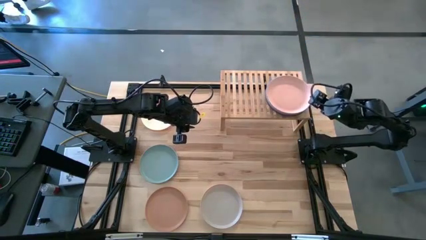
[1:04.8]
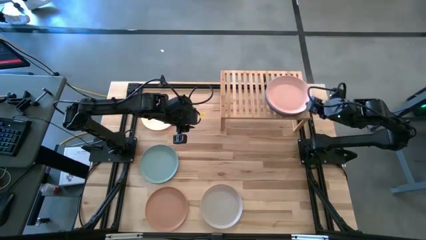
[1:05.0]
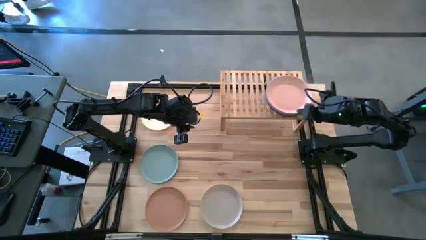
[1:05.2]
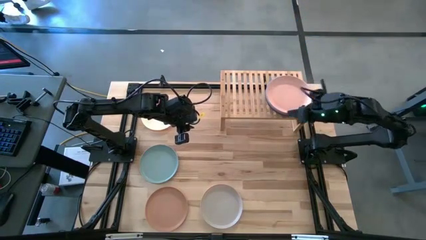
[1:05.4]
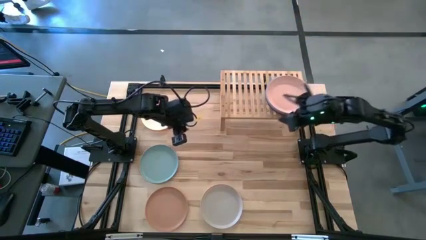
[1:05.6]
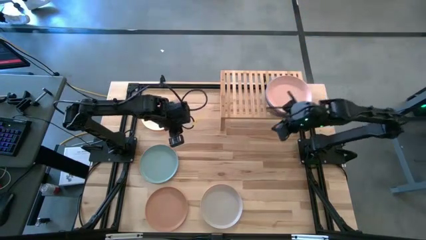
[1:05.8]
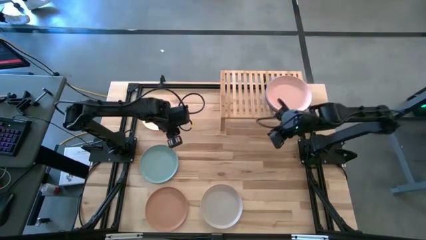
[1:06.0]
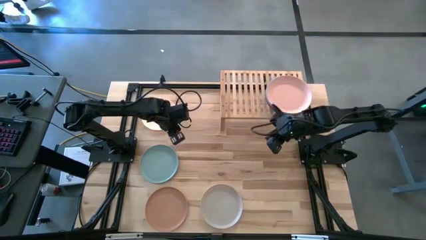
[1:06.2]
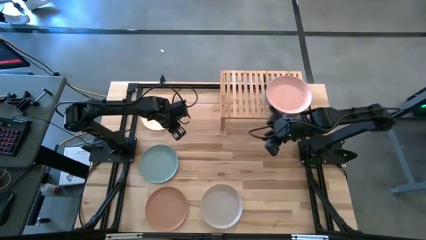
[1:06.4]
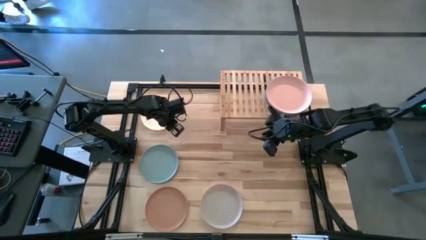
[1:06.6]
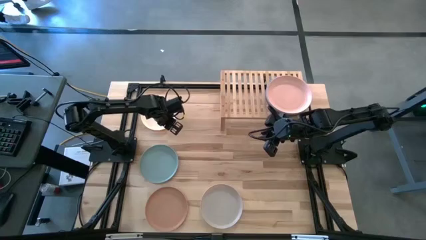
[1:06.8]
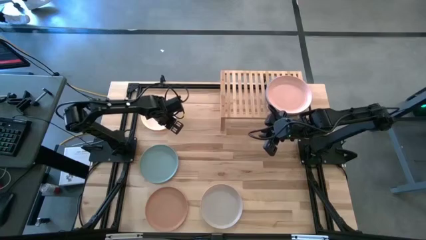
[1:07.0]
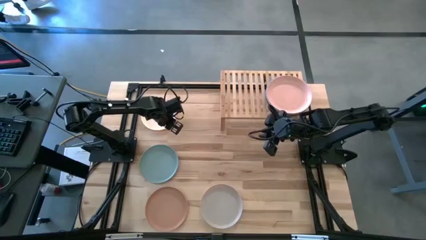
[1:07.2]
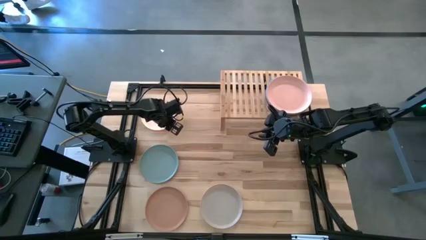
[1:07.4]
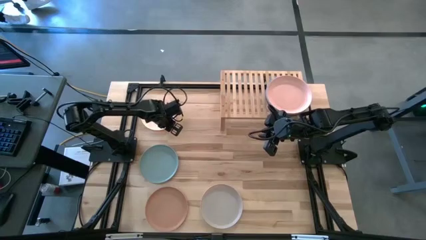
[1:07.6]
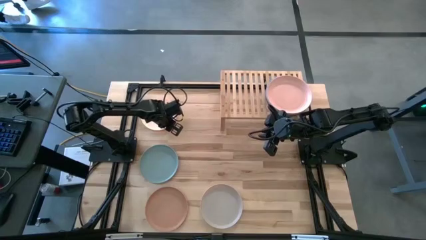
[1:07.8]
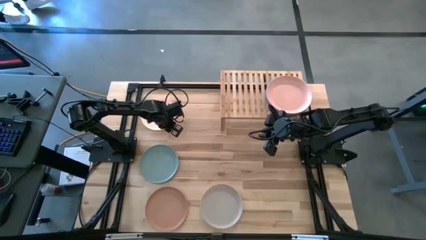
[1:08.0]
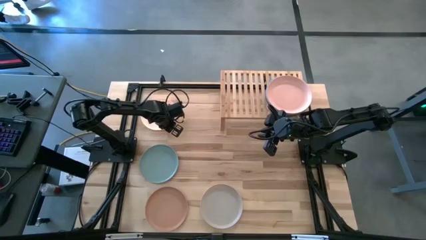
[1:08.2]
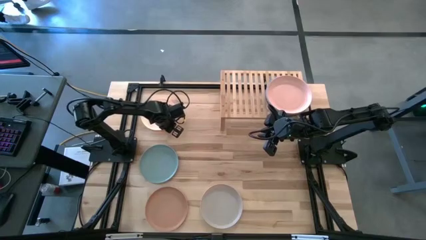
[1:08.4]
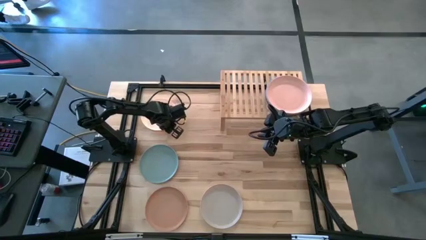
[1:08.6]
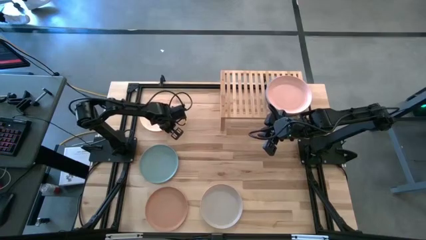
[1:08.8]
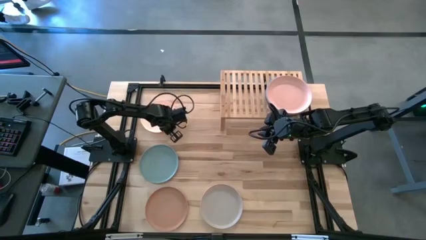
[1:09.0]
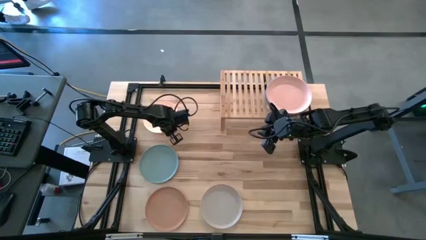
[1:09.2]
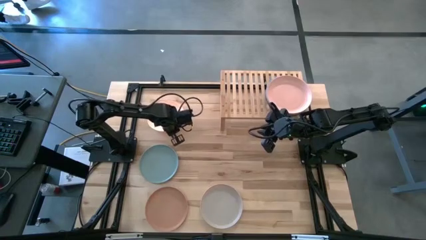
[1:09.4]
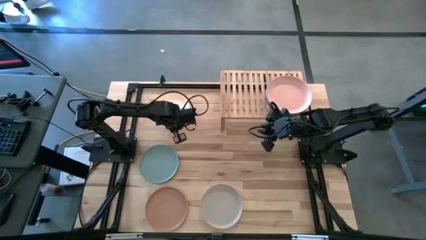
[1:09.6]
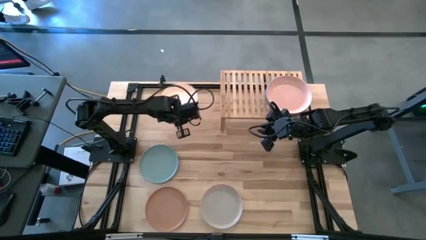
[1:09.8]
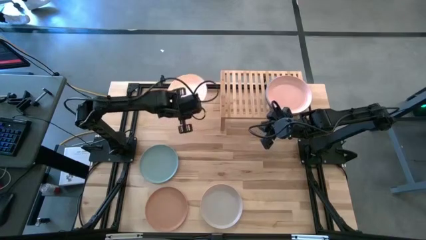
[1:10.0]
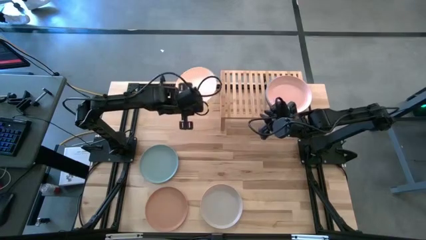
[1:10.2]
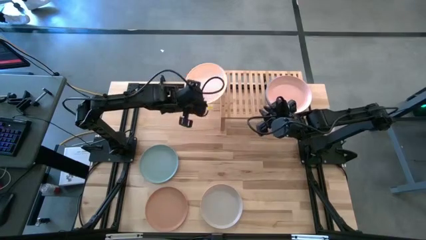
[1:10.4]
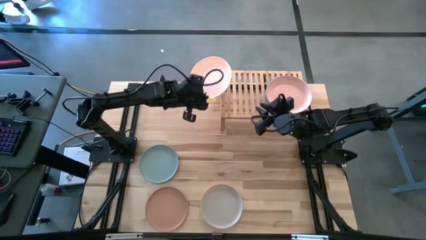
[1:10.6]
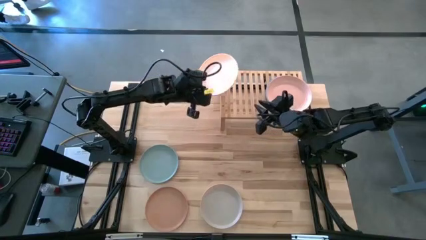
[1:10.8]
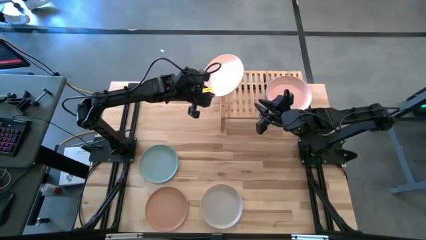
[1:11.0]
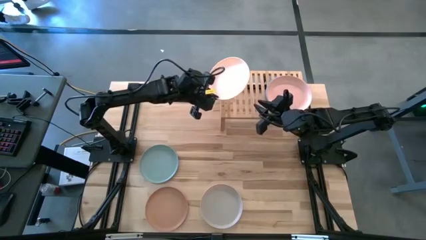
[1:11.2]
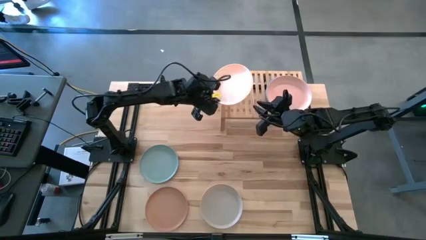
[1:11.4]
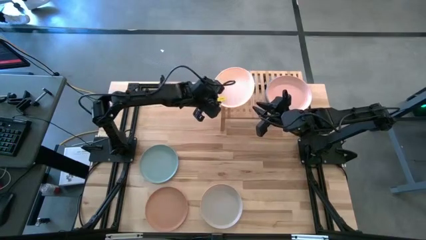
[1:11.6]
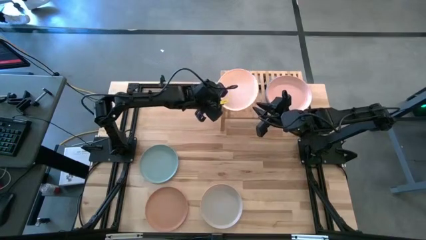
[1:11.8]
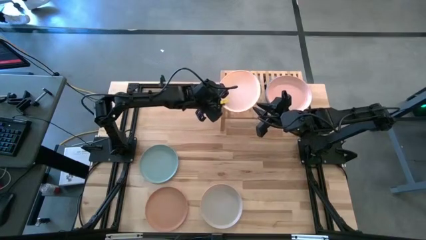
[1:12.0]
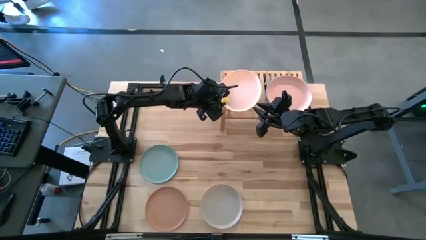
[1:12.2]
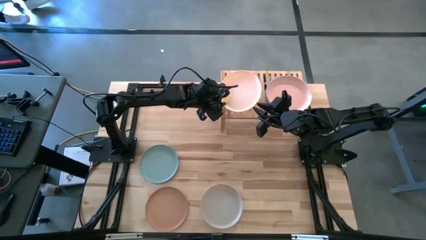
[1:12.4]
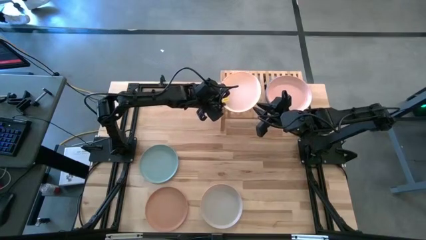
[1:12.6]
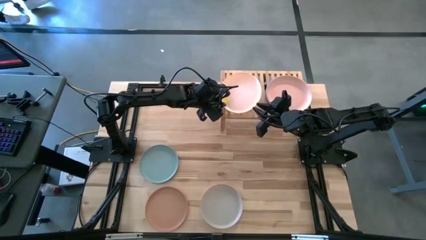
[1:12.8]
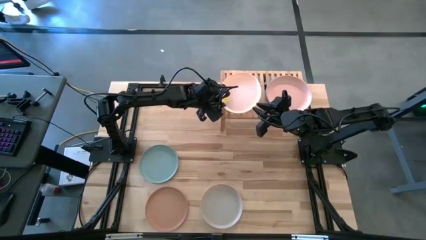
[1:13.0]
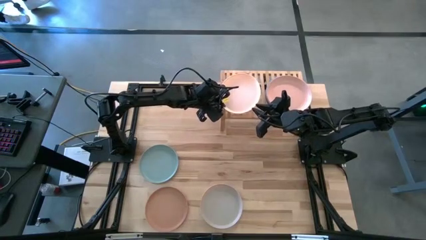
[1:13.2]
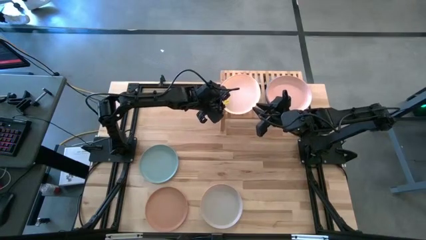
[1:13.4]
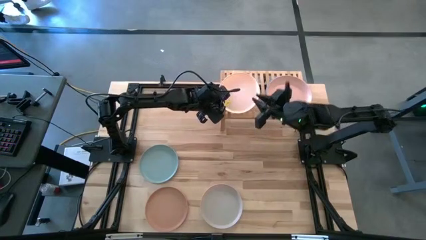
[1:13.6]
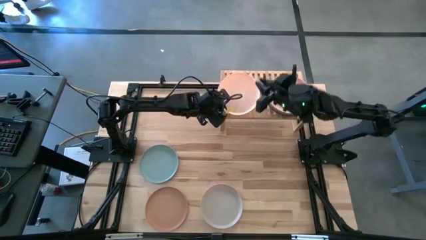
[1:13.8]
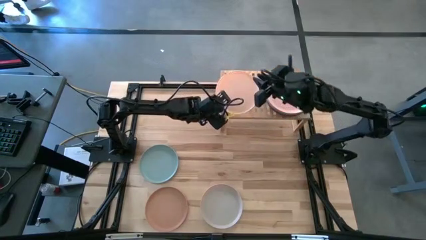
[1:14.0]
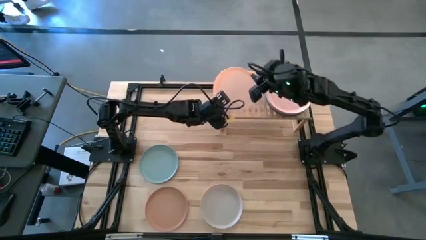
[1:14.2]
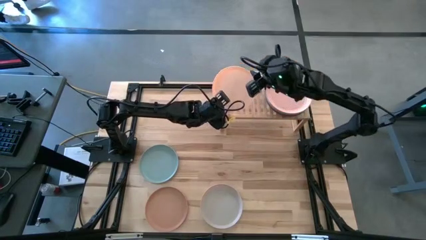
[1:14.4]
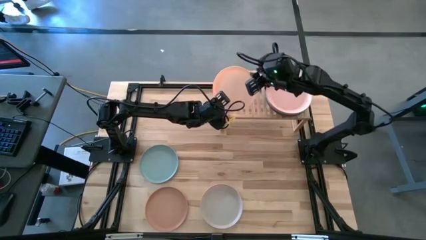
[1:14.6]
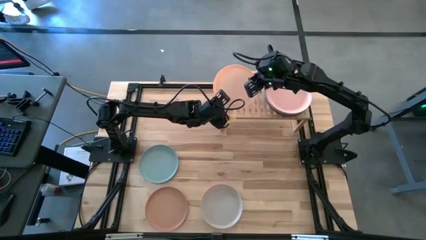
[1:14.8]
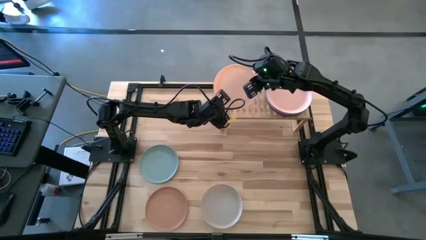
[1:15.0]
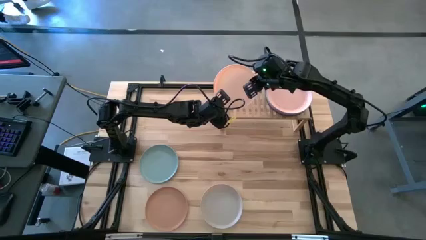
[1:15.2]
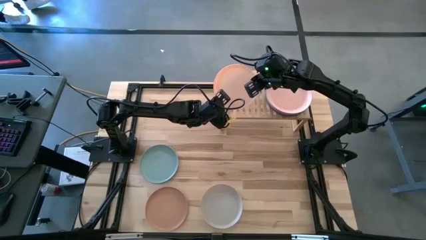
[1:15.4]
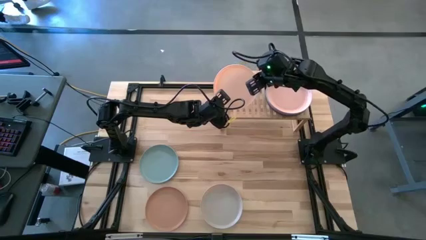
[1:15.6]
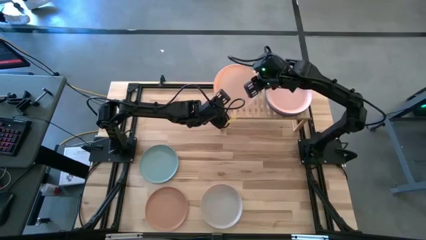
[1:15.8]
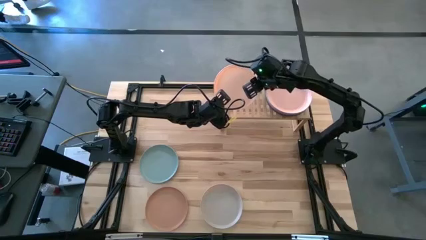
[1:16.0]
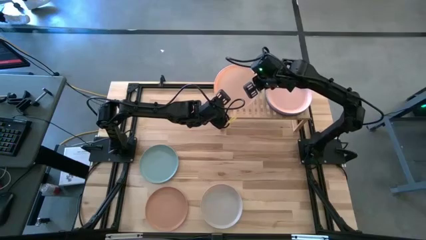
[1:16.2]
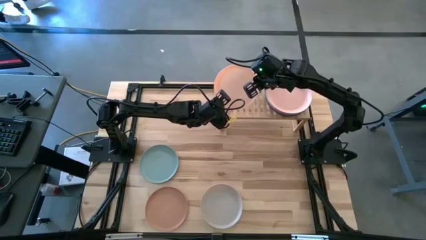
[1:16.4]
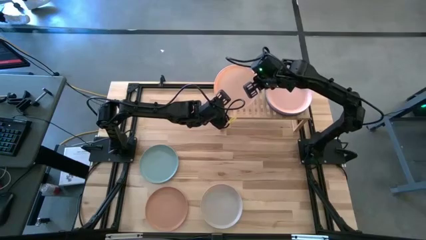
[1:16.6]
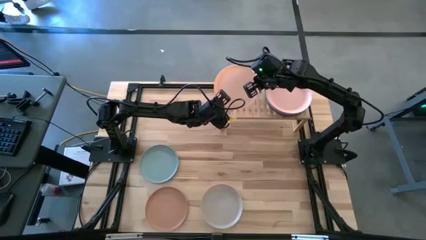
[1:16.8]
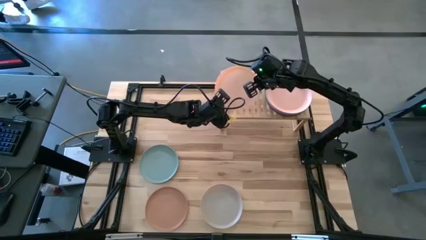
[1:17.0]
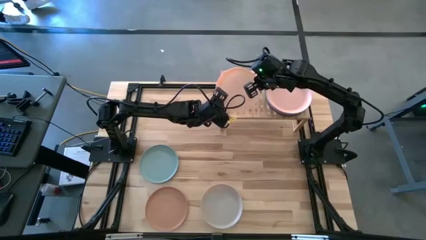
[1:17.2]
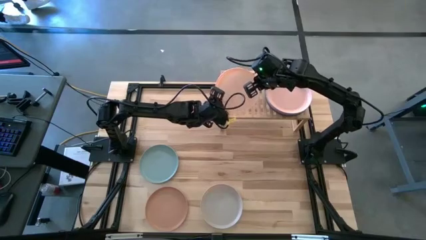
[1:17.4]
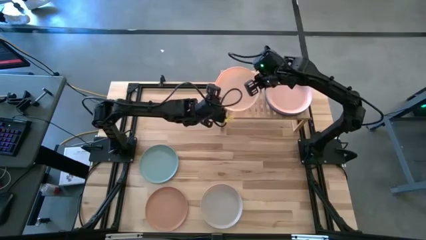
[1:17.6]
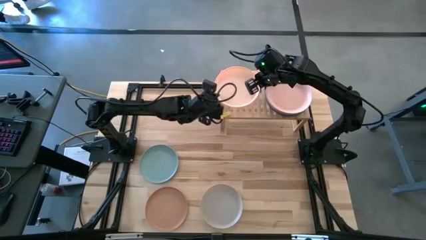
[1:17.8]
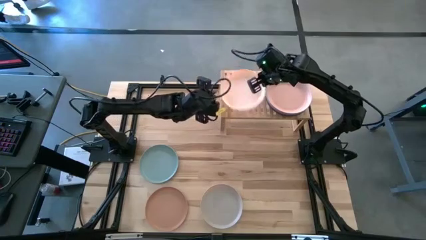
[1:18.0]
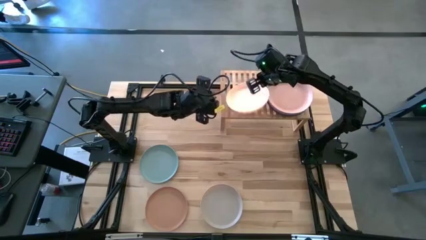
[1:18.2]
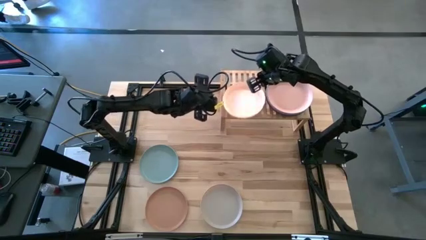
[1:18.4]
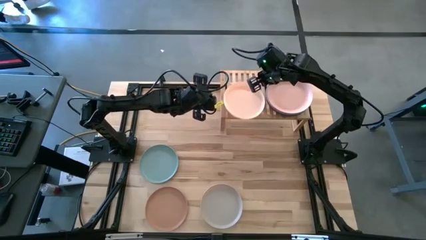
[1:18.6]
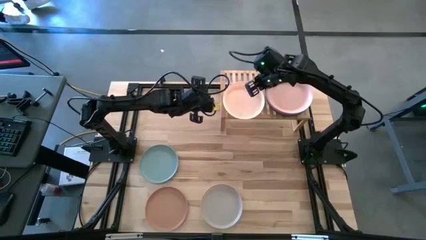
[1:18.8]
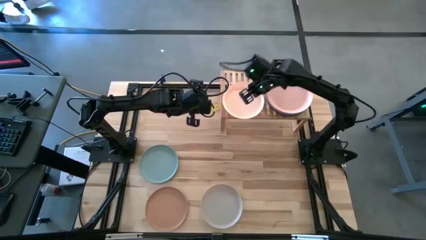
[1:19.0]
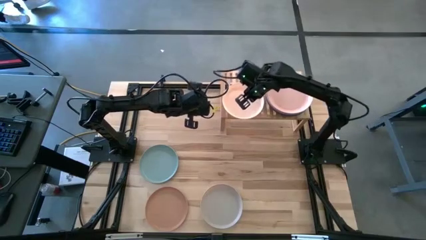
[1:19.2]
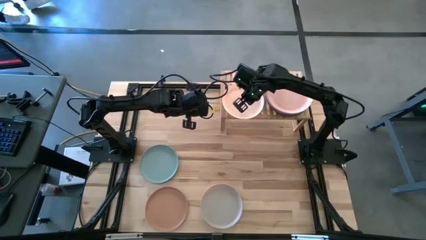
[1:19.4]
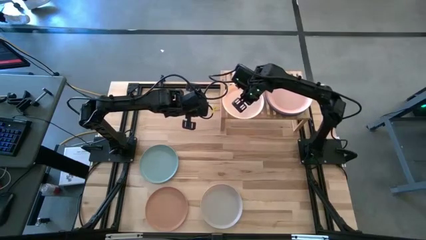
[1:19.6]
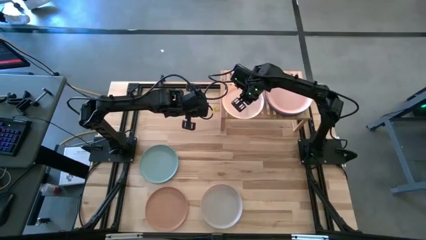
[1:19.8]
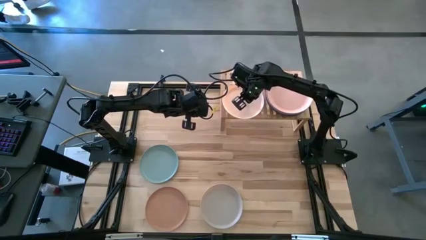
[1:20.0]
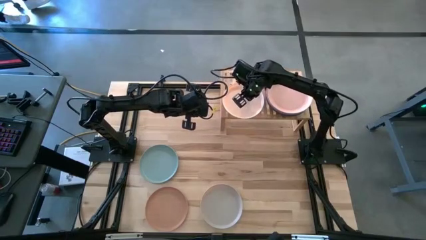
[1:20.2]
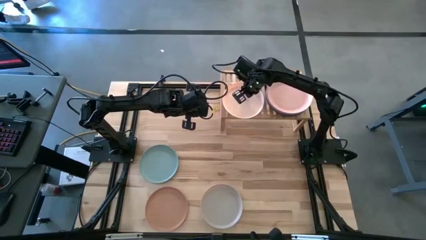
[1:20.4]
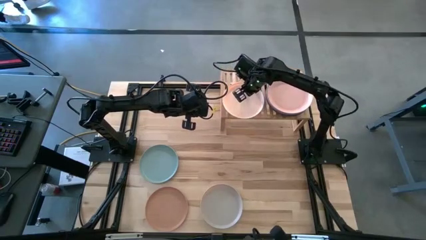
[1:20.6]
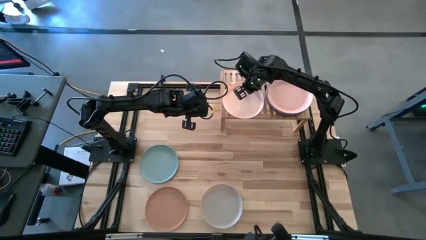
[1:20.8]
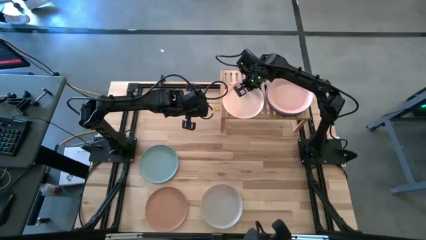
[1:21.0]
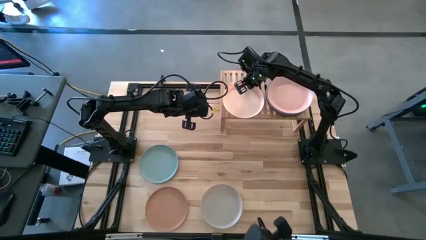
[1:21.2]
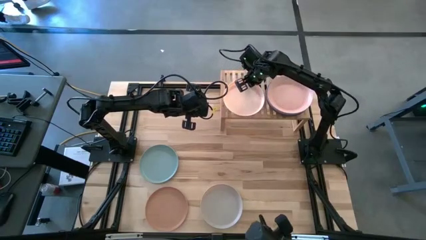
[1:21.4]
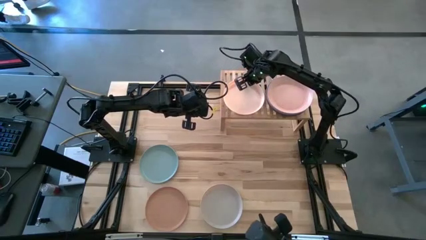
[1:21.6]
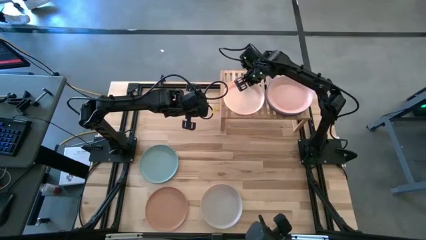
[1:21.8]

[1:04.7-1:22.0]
Task: Place and stack plates onto a shelf
Put the white plate on the shelf
